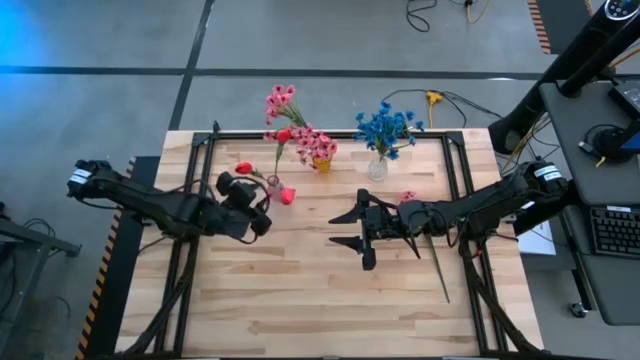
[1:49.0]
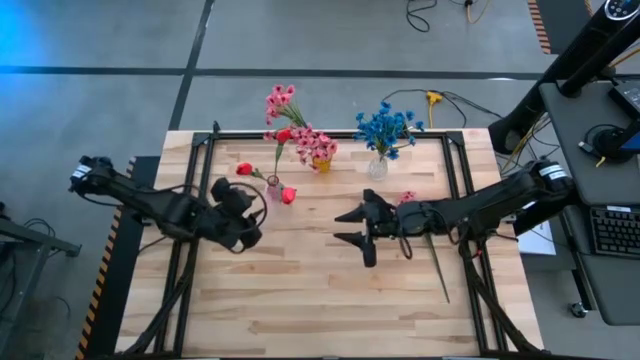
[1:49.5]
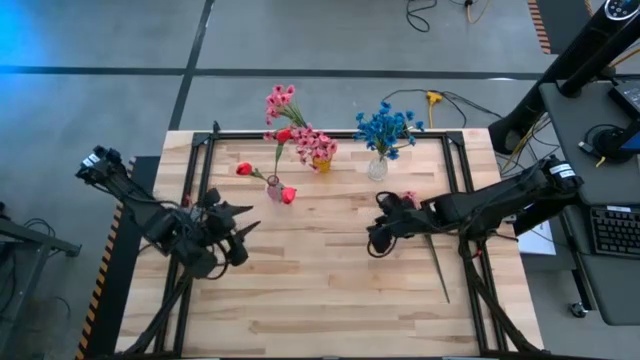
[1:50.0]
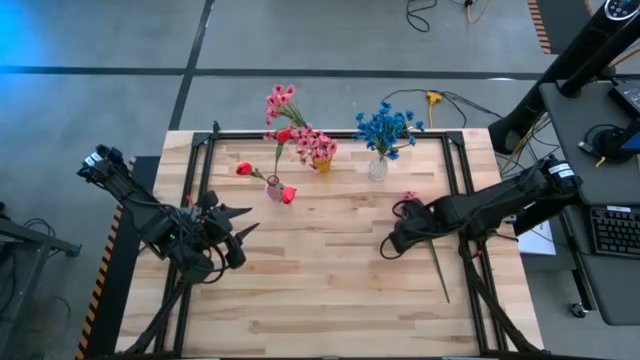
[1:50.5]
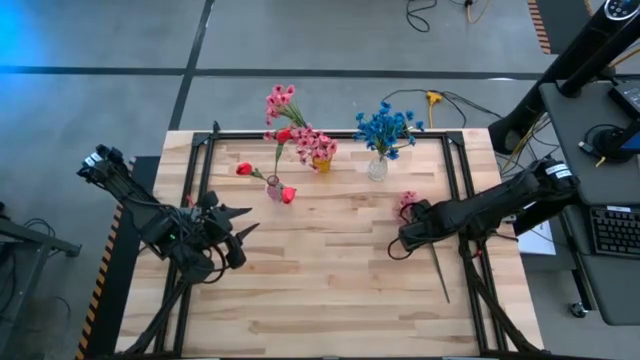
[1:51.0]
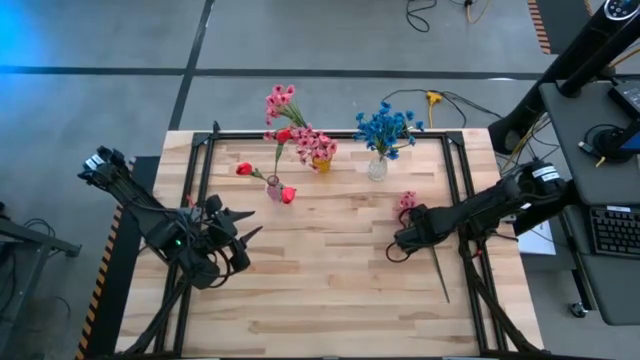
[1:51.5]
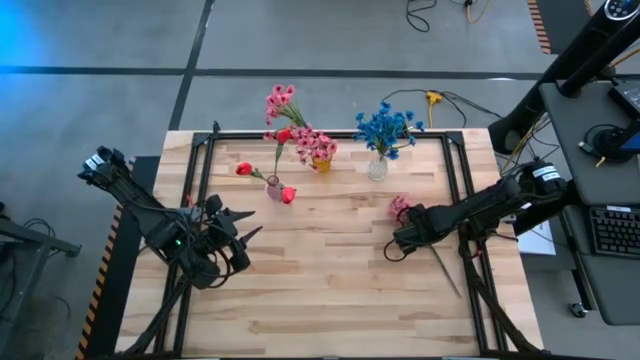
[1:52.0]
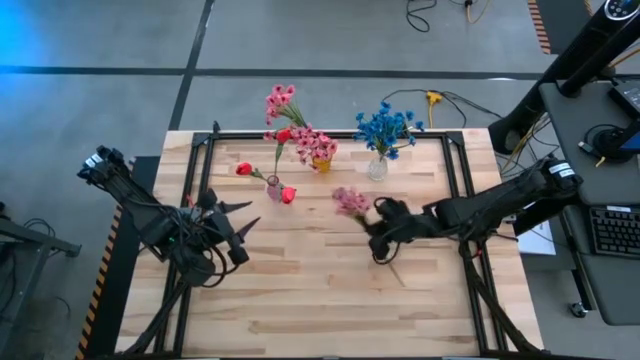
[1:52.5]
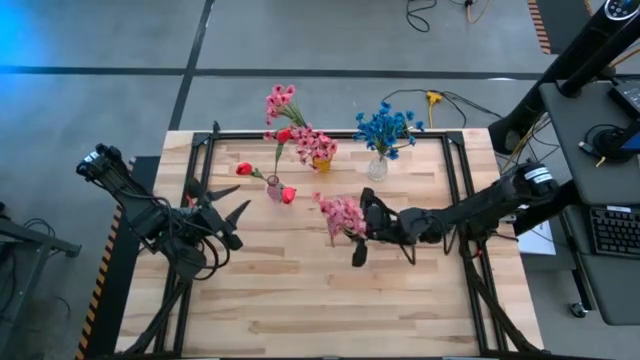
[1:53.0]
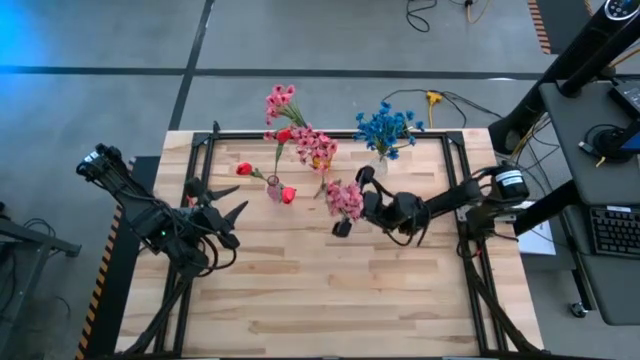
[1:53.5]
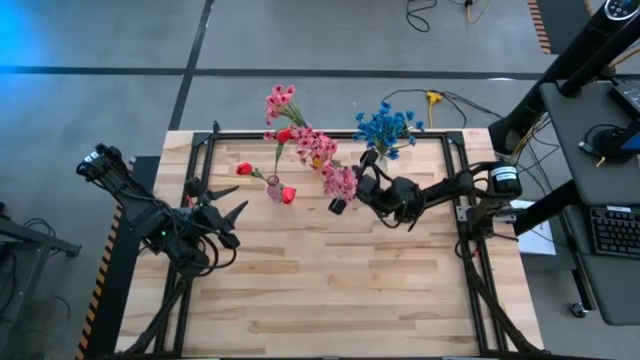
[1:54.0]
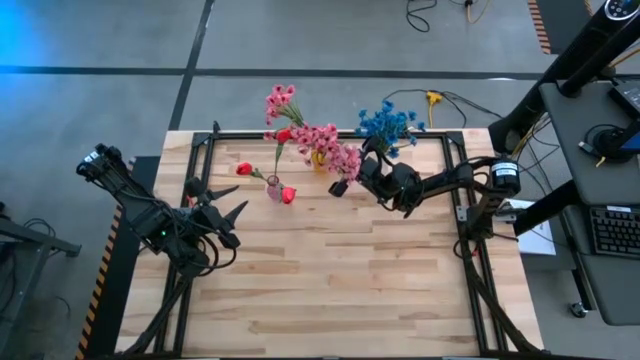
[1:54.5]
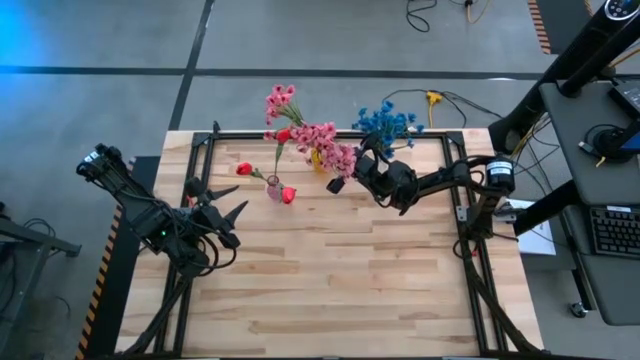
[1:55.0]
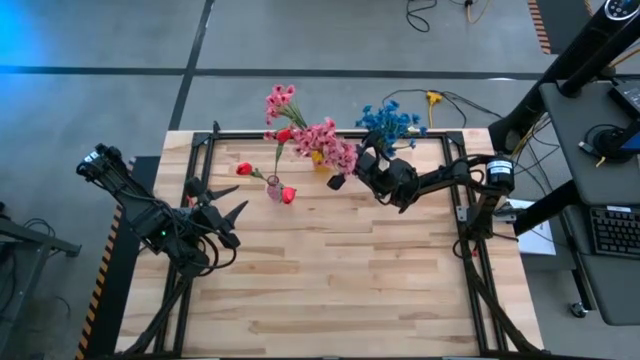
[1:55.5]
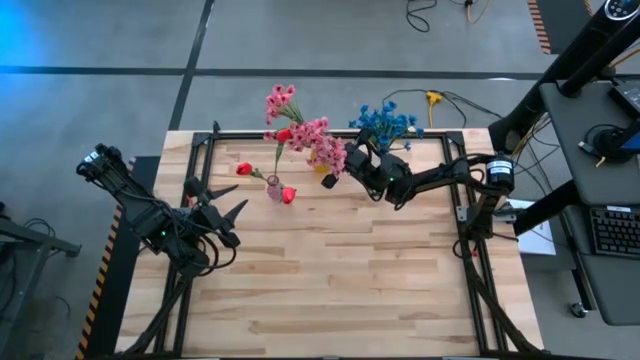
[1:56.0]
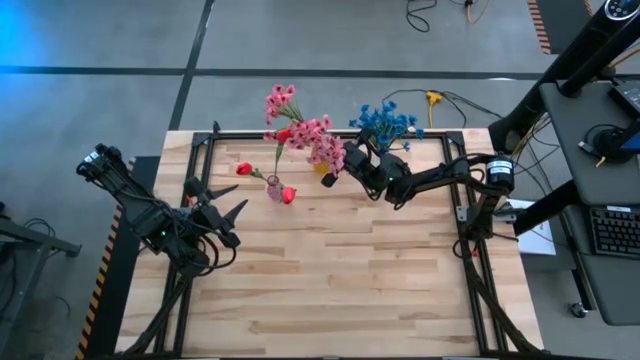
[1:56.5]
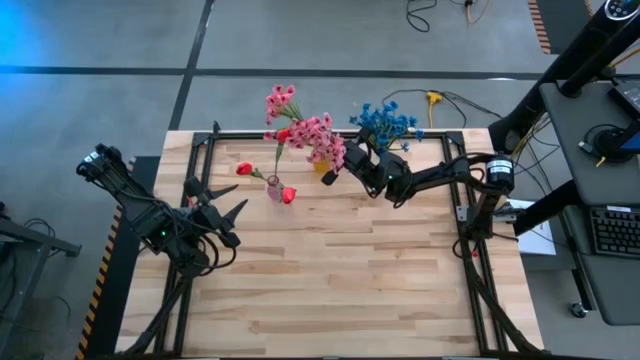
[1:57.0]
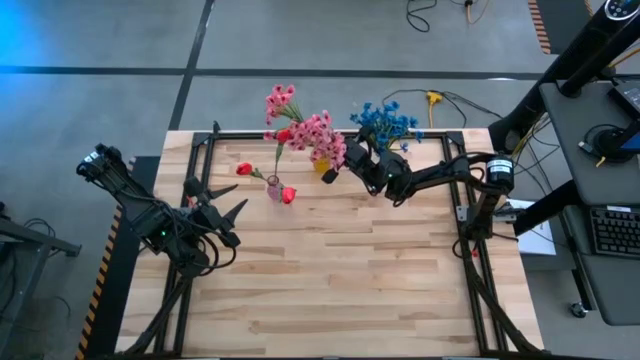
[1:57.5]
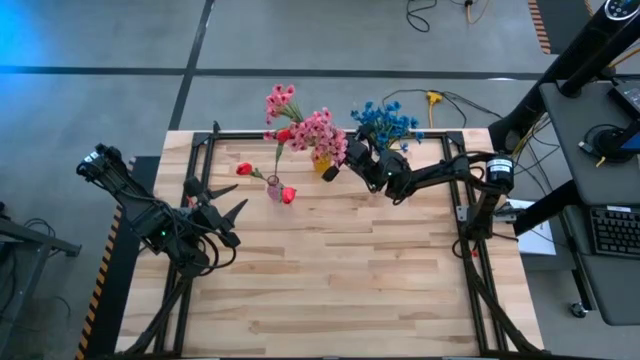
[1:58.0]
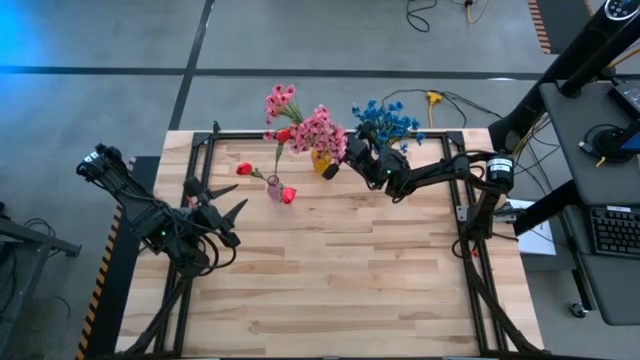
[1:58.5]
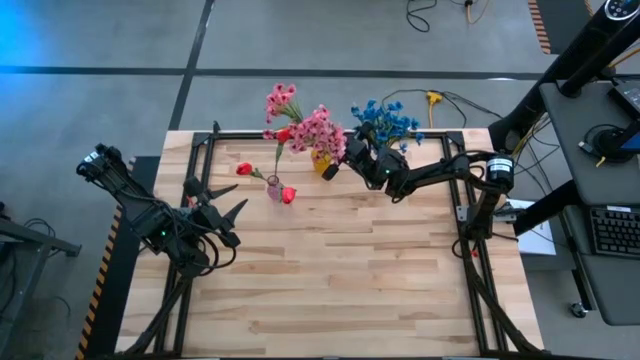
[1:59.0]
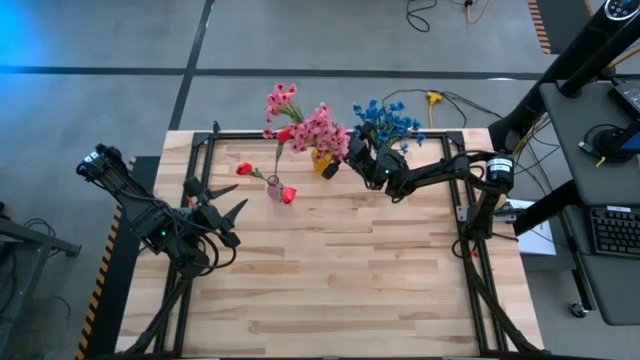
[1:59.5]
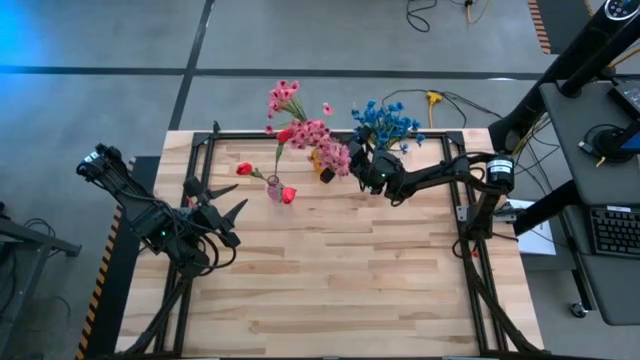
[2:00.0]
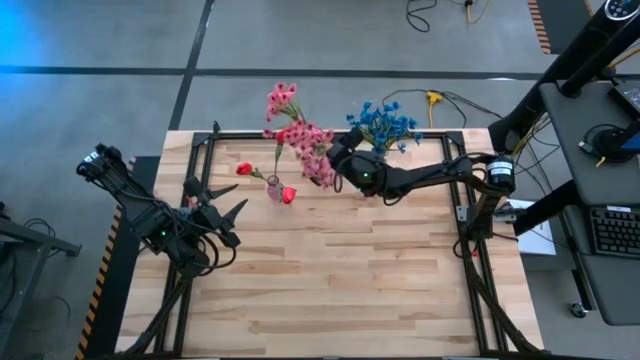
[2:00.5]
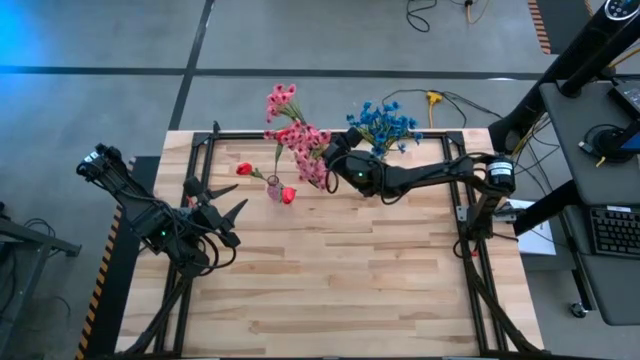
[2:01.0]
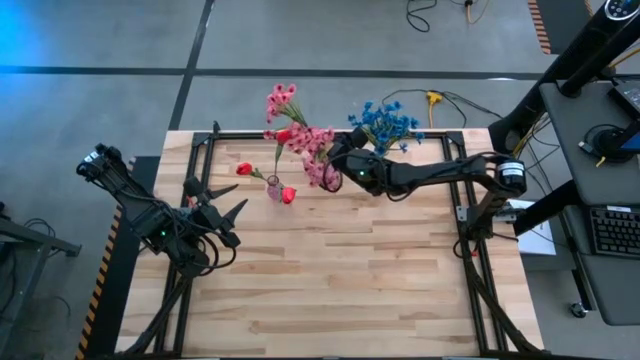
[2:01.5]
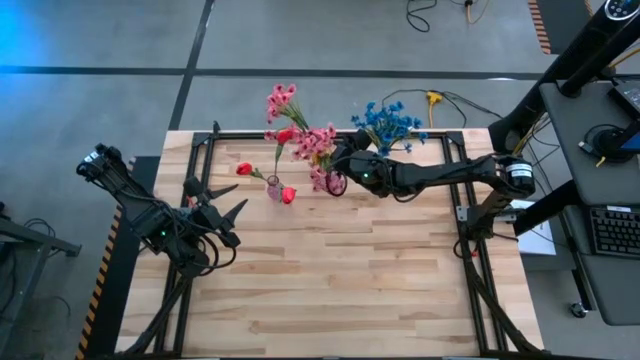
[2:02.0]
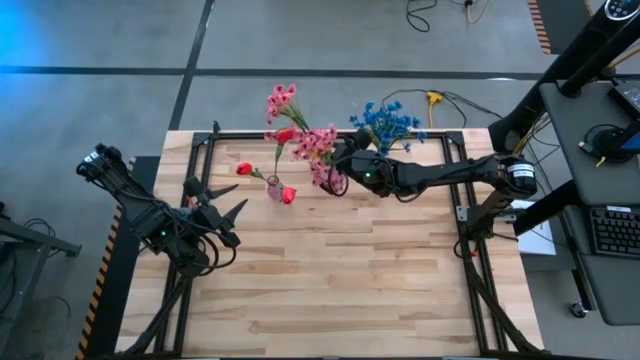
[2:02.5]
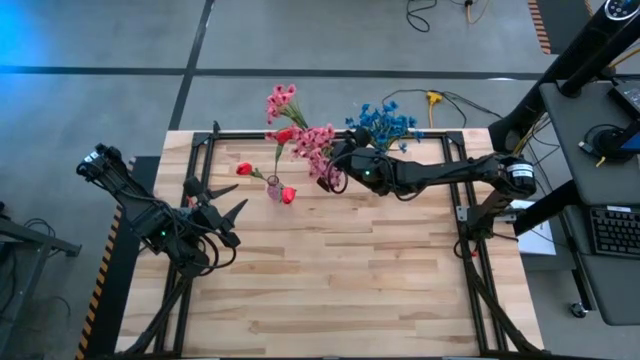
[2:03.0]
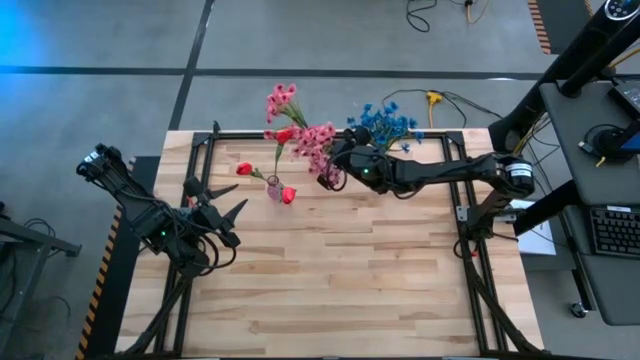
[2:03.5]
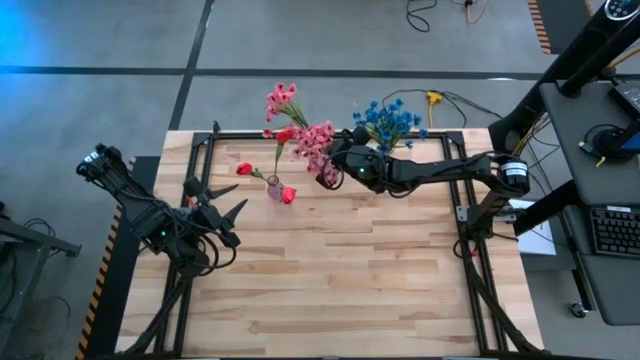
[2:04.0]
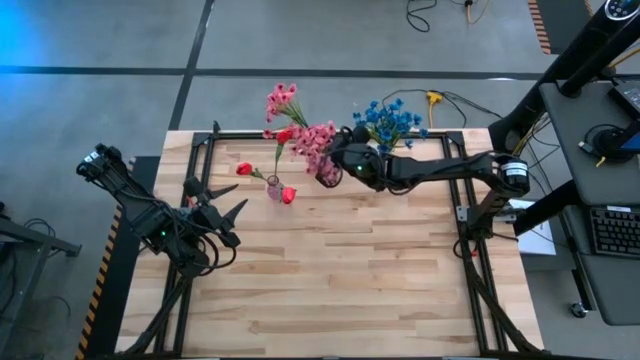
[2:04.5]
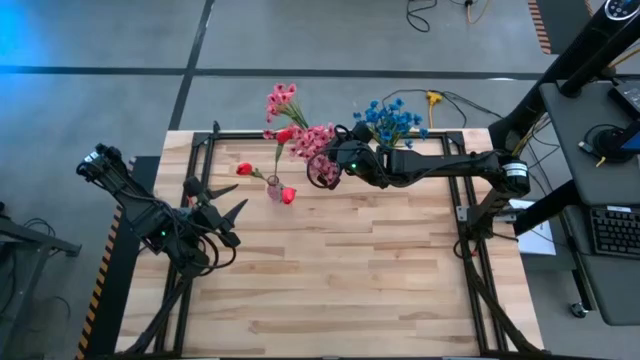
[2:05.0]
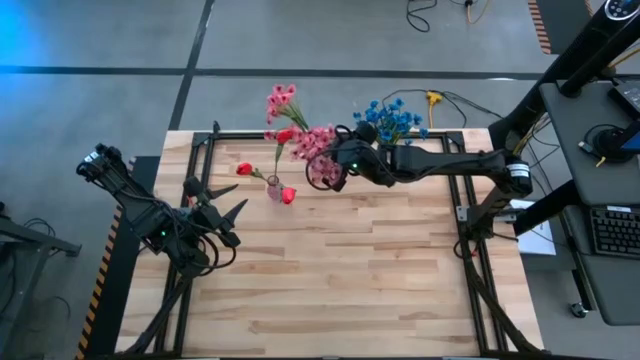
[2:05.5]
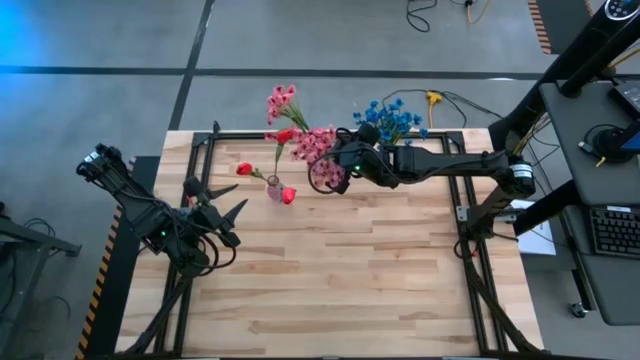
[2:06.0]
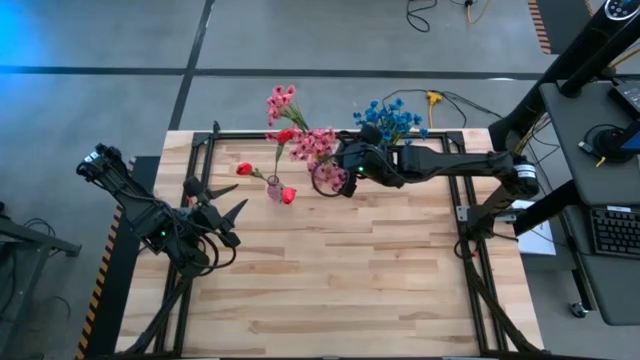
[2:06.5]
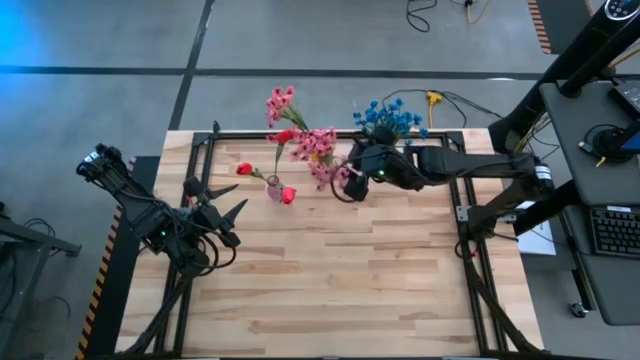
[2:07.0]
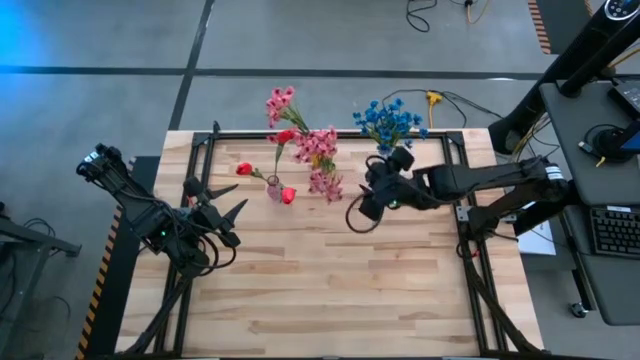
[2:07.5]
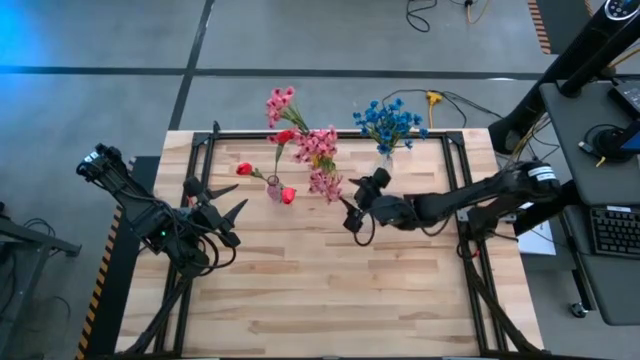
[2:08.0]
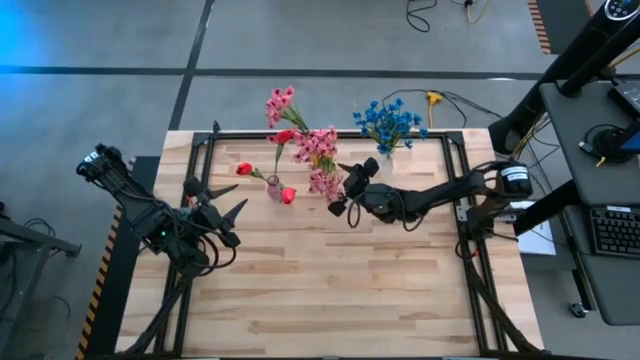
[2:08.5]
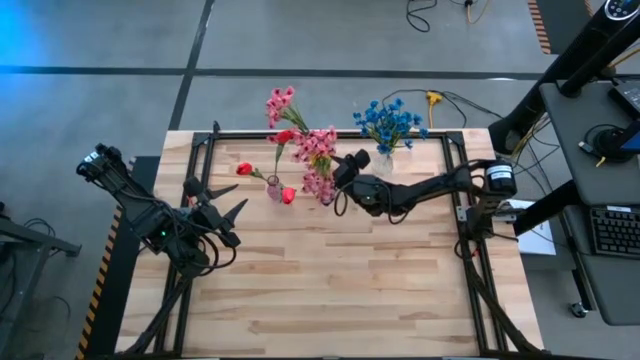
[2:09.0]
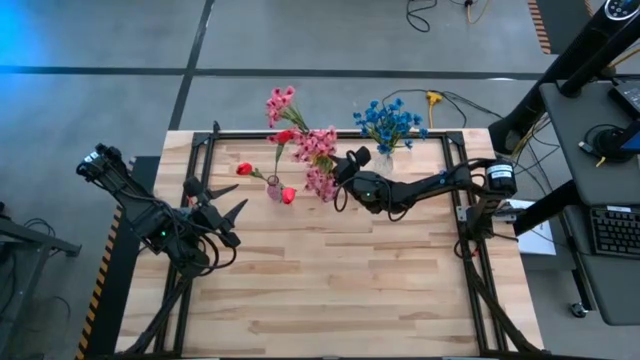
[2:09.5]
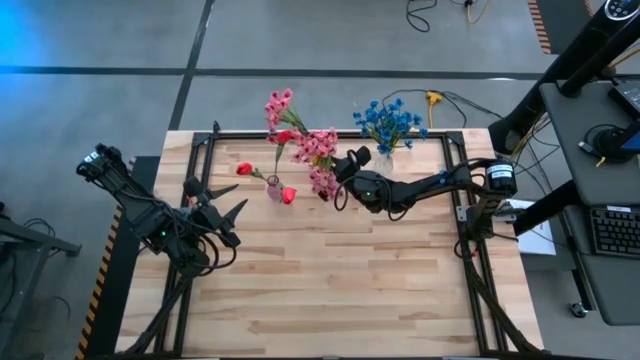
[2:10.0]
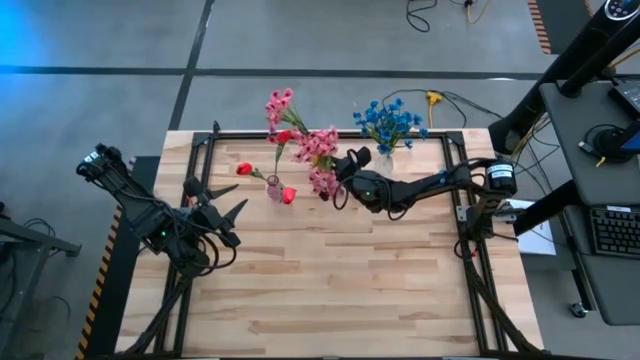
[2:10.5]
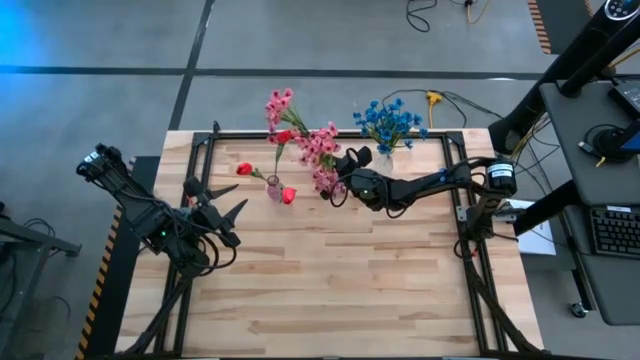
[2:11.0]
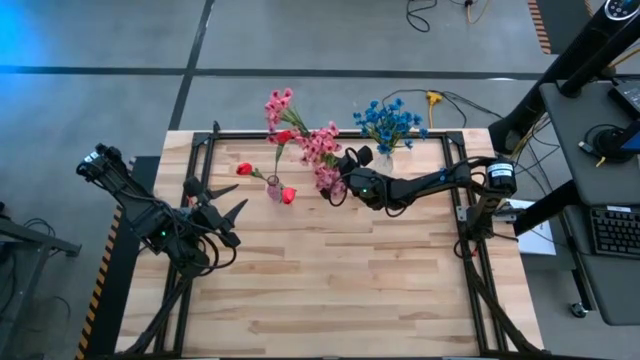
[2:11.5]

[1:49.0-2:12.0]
Task: Sort flowers into vase by color
Put the pink flowers into the yellow vase
